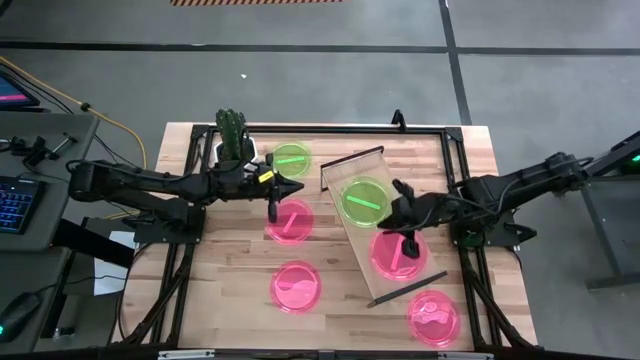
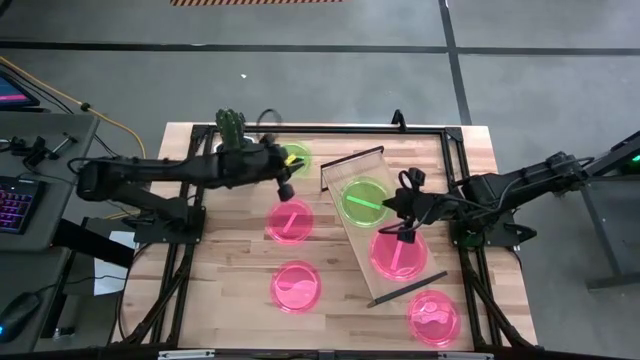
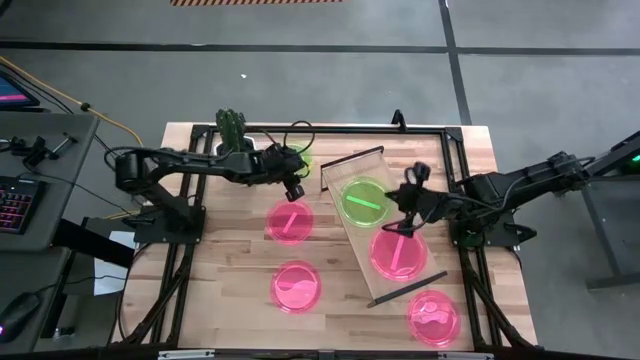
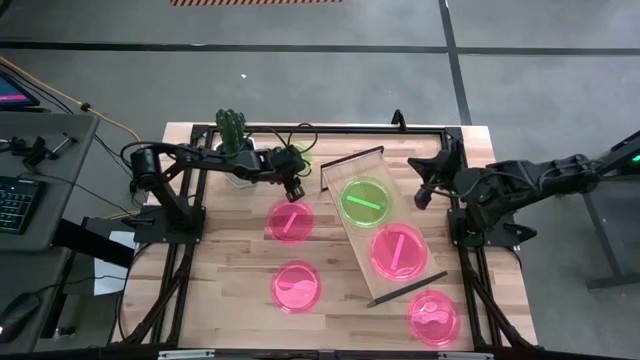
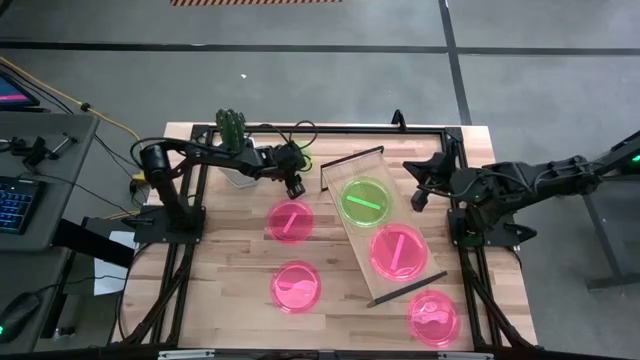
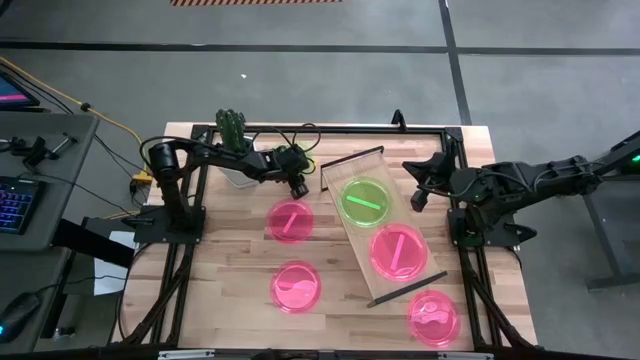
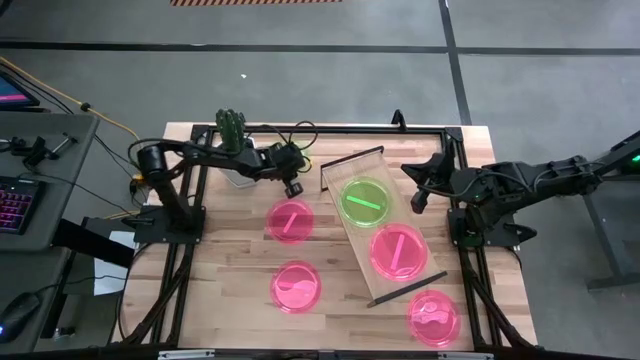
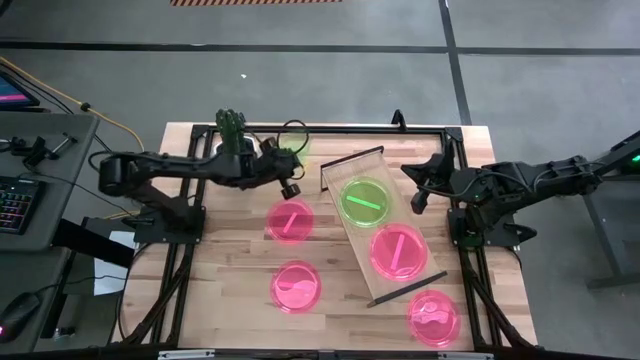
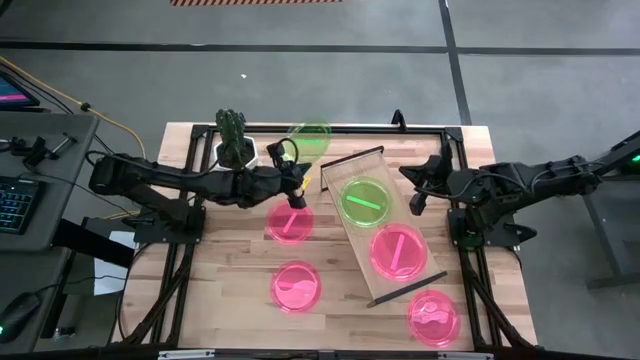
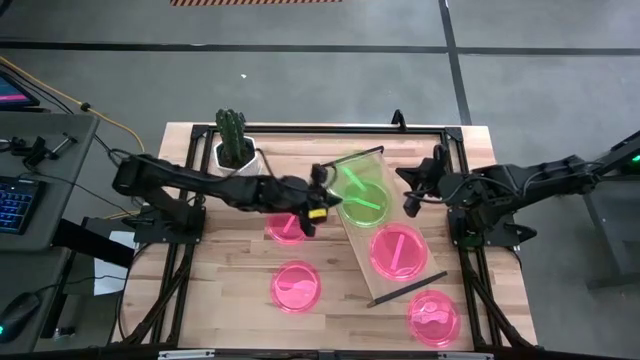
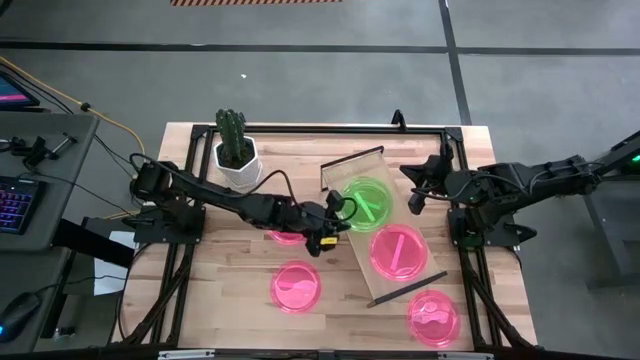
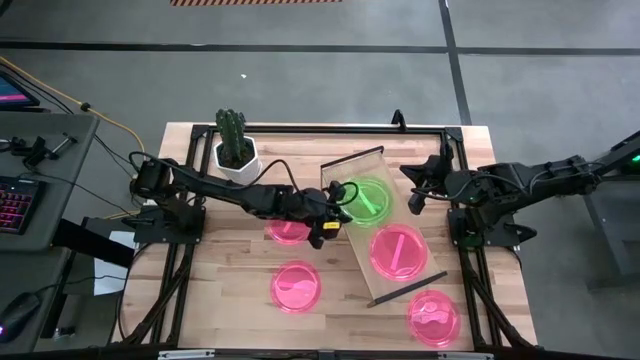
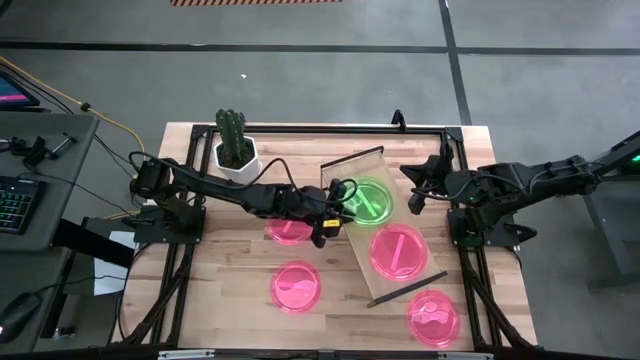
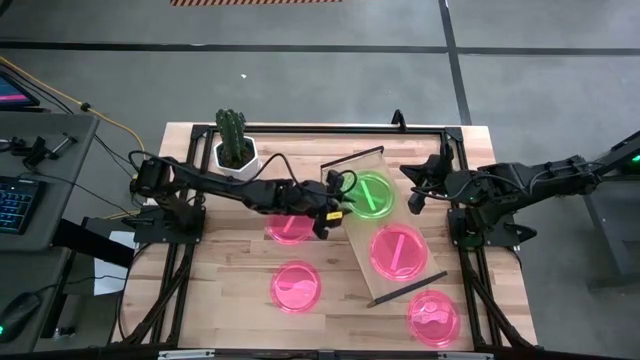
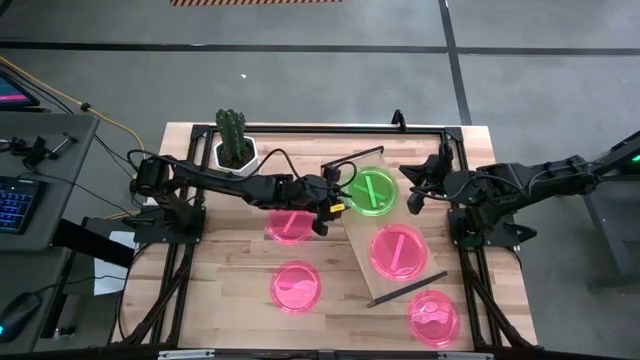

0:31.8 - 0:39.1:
Task: Place and stack plates onto a shelf
Stack the green plate on top of the other green plate on the shelf

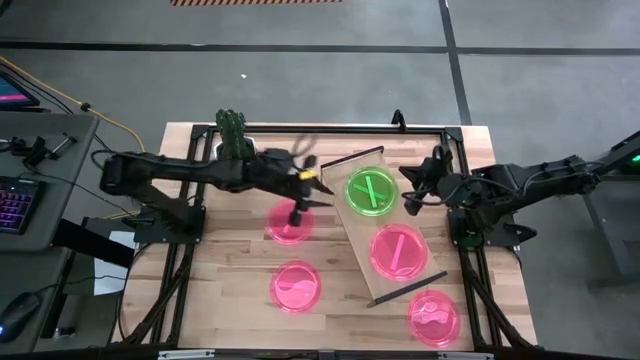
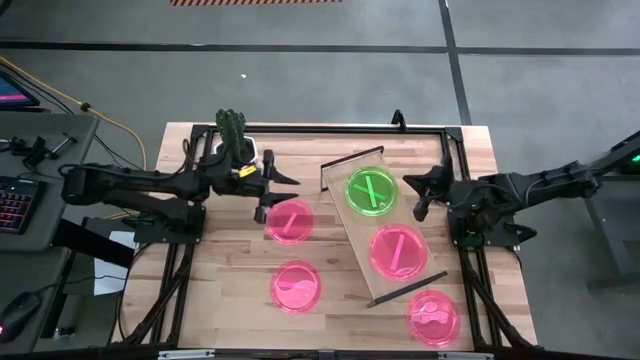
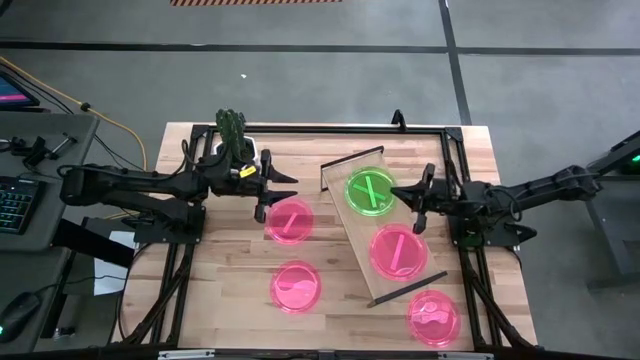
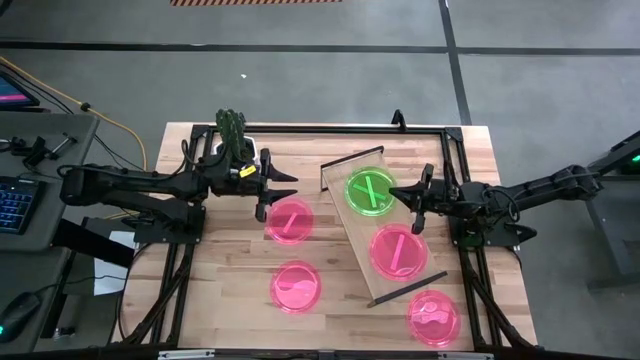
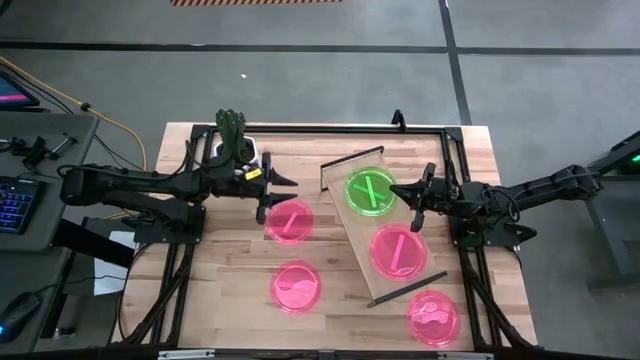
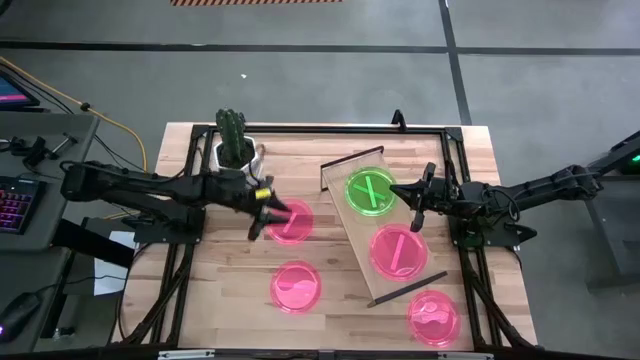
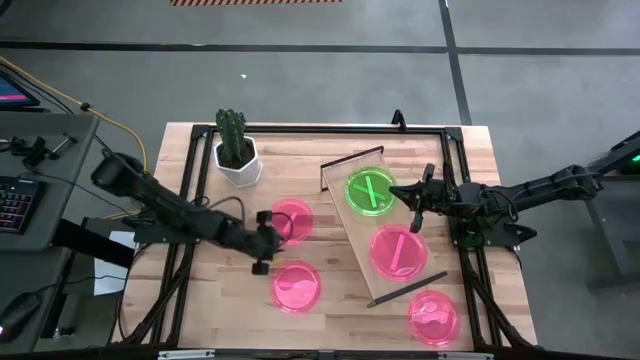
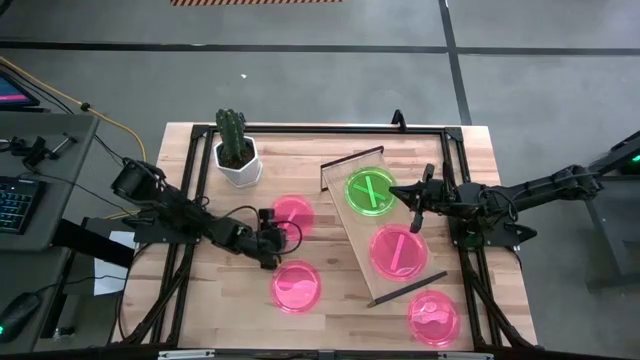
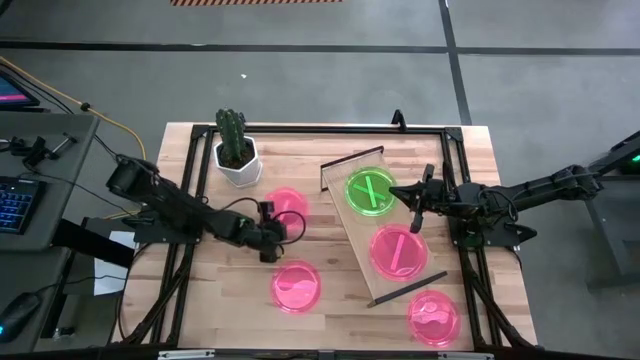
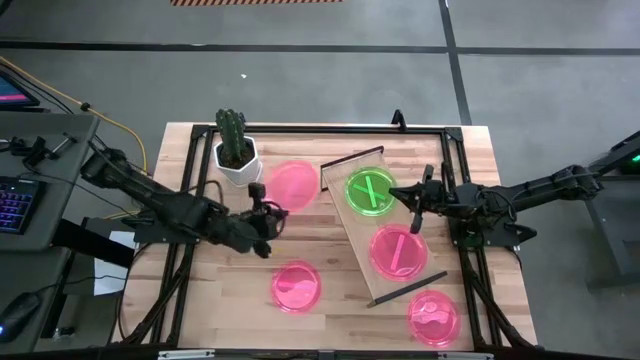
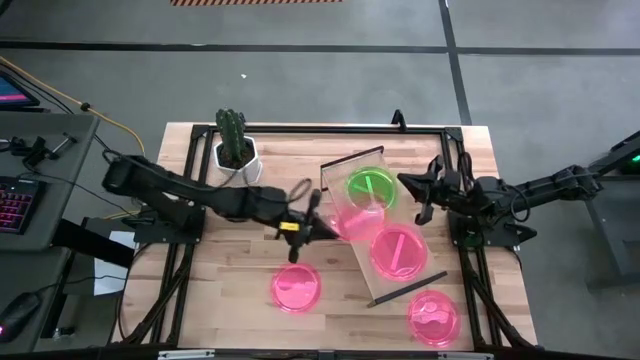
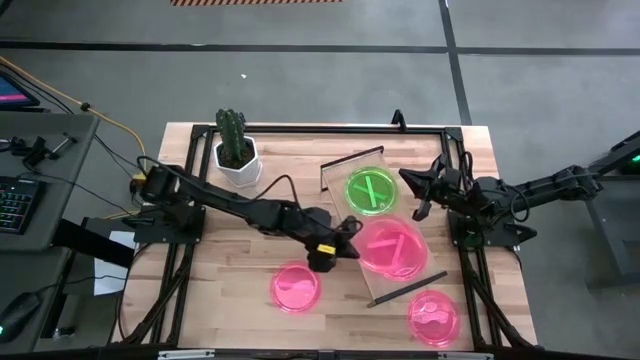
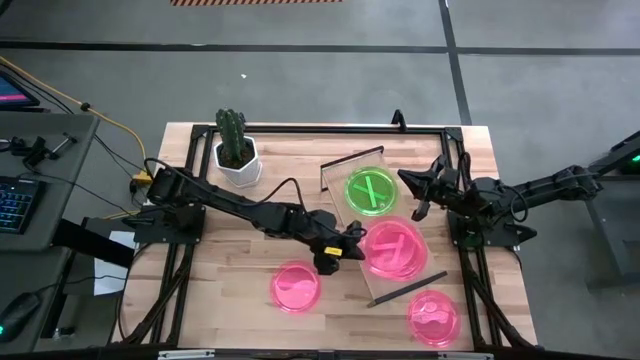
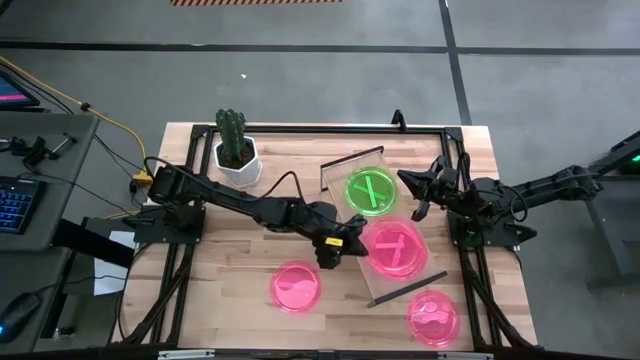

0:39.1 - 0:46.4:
Stack the top left pink plate on top of the other pink plate on the shelf

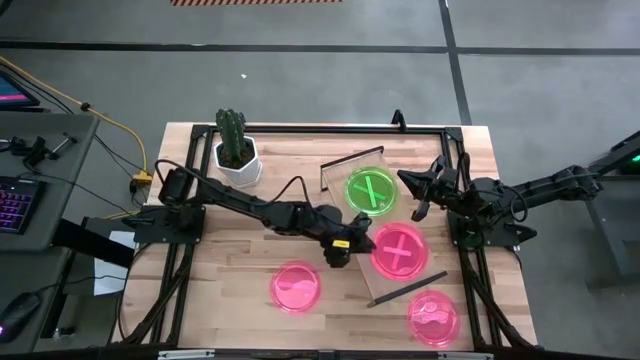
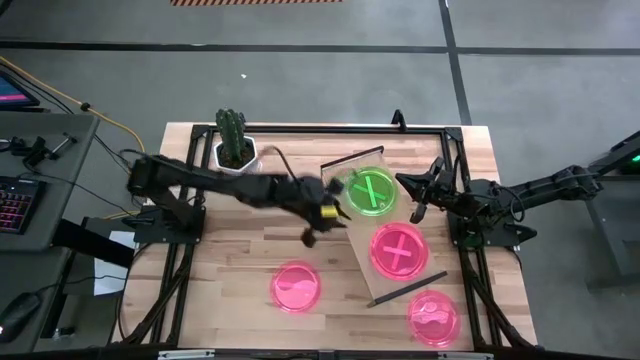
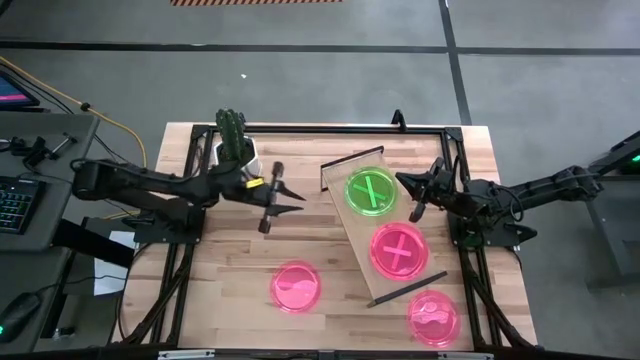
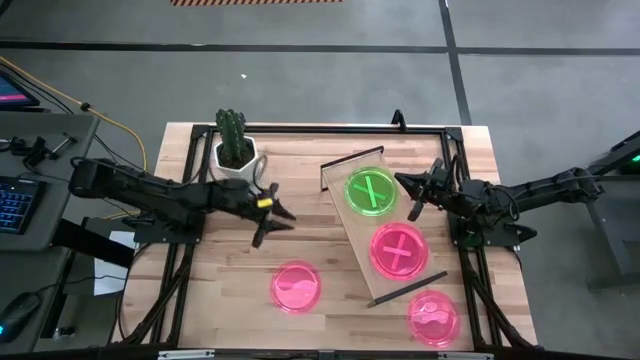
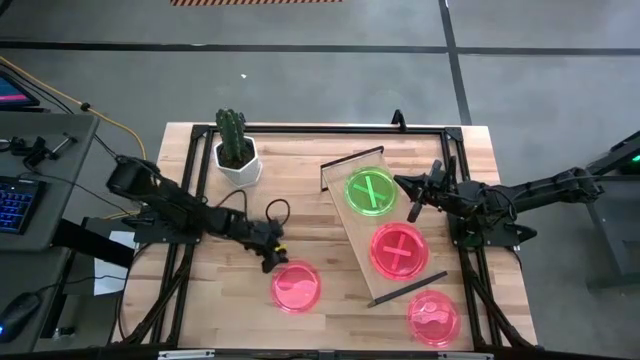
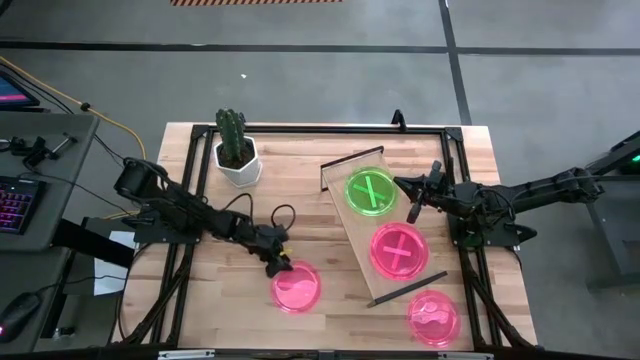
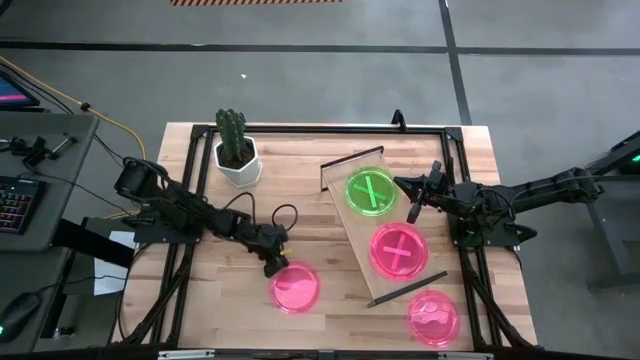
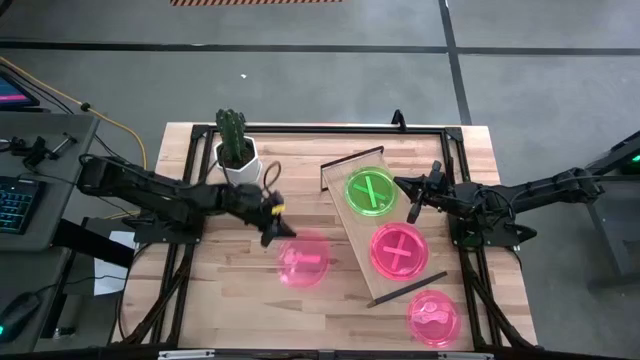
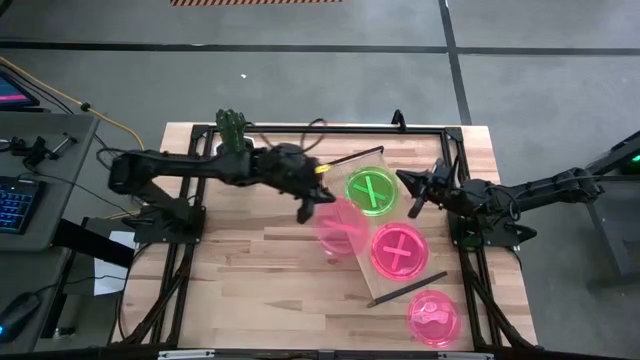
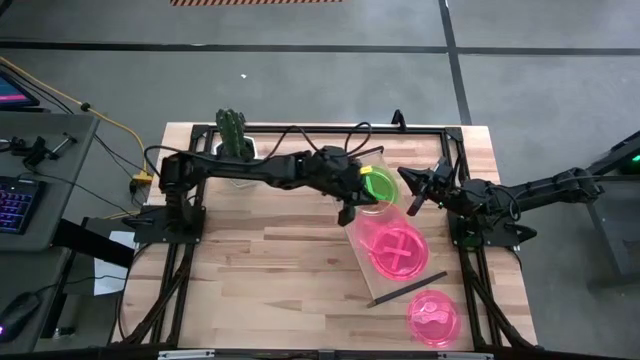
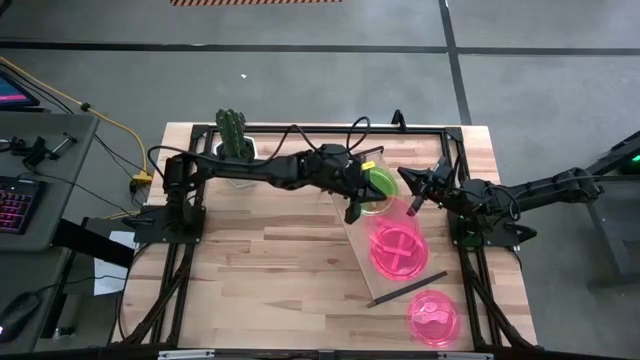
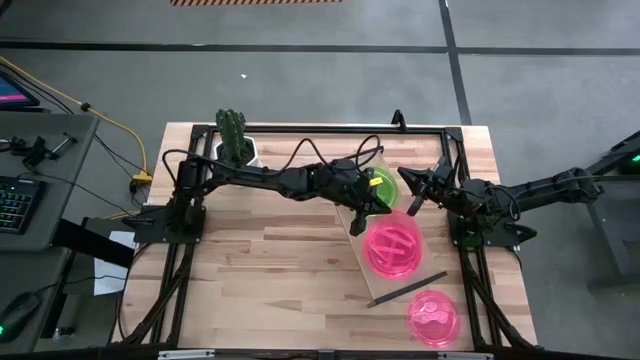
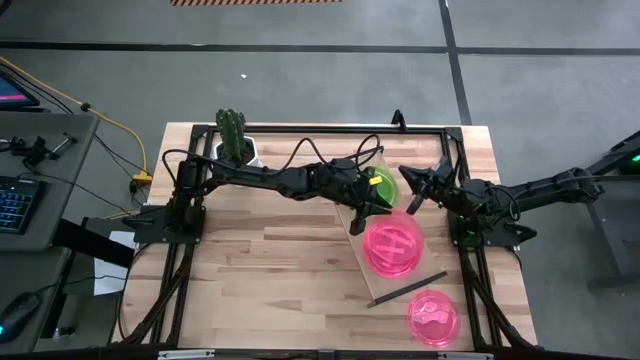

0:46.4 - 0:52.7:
Stack the left pink plate on top of the other pink plate on the shelf
